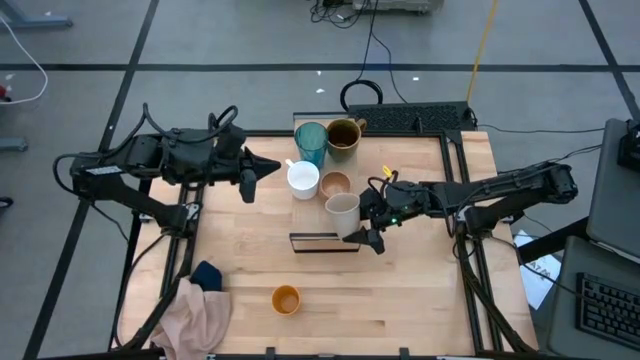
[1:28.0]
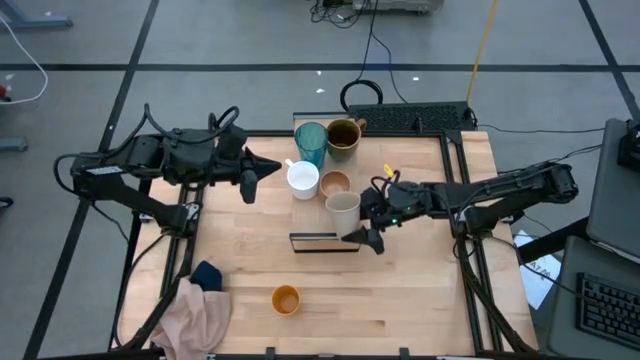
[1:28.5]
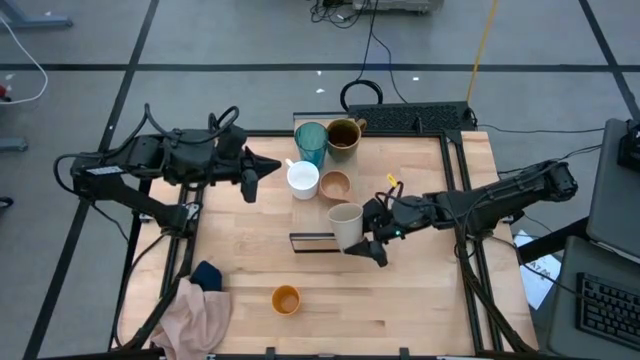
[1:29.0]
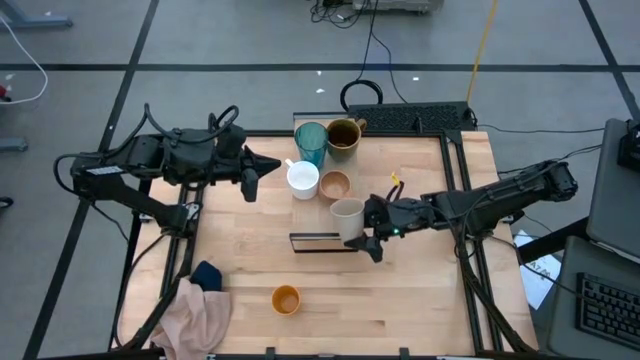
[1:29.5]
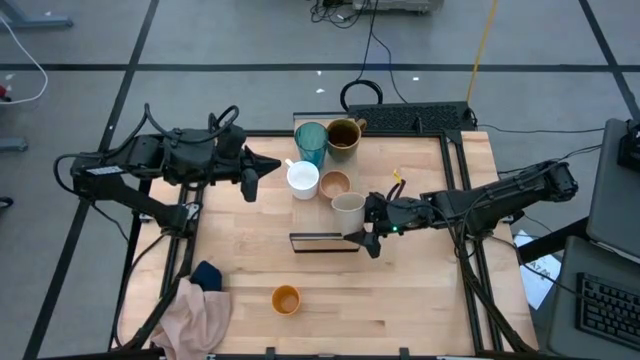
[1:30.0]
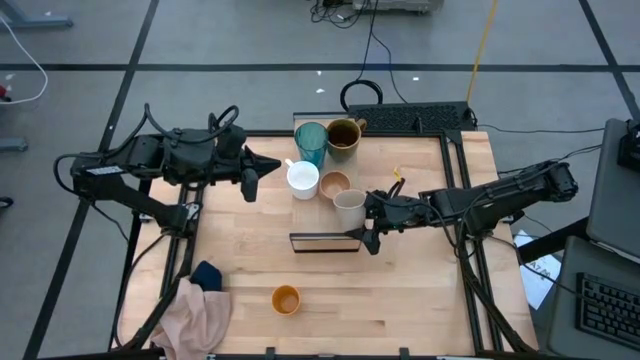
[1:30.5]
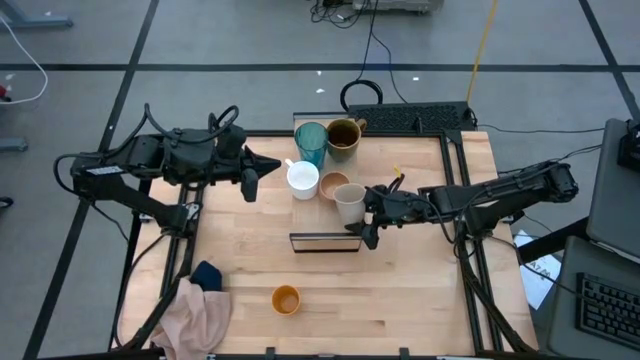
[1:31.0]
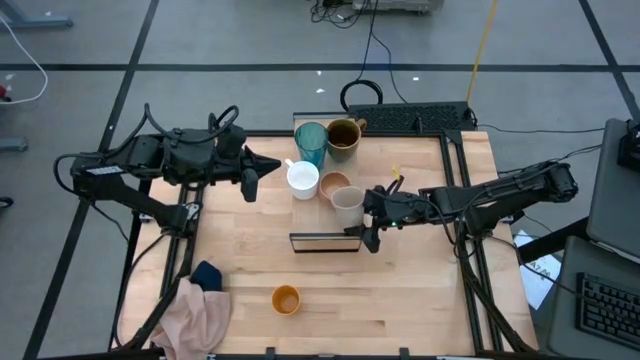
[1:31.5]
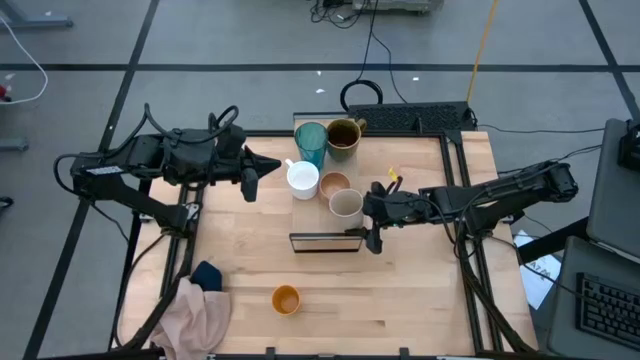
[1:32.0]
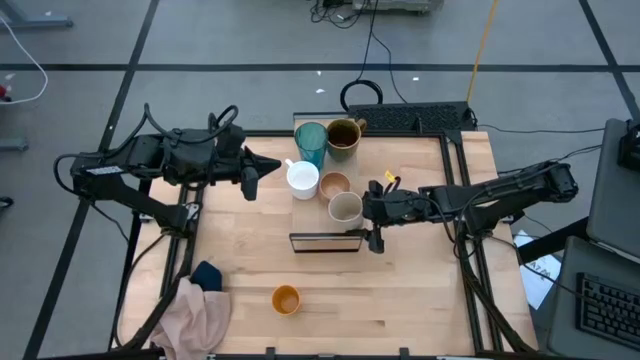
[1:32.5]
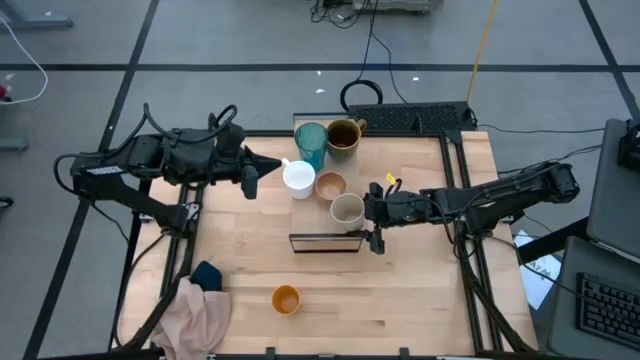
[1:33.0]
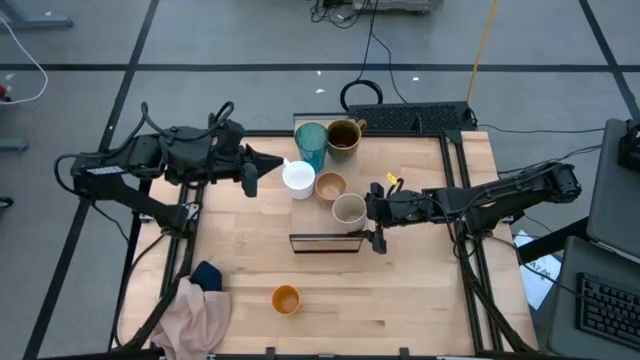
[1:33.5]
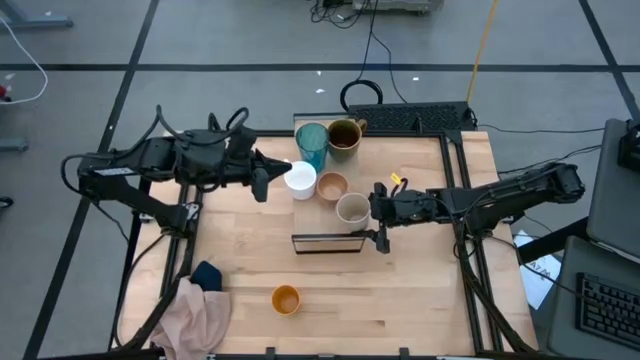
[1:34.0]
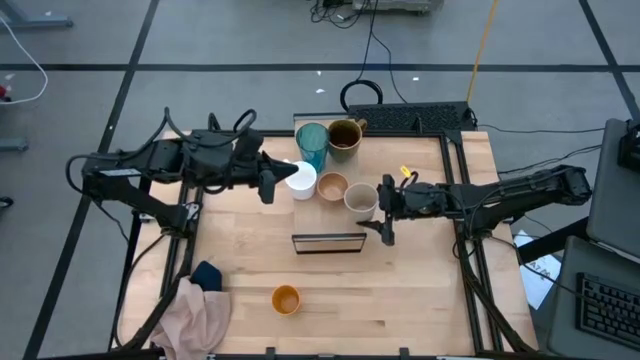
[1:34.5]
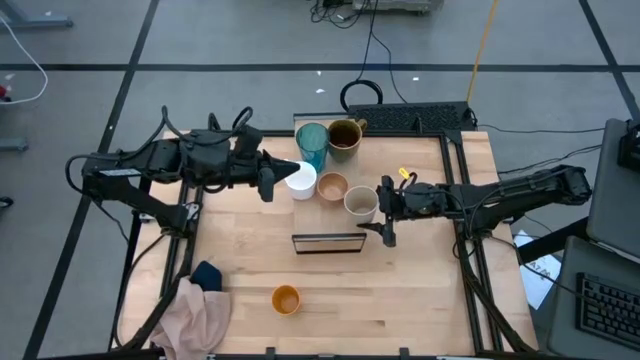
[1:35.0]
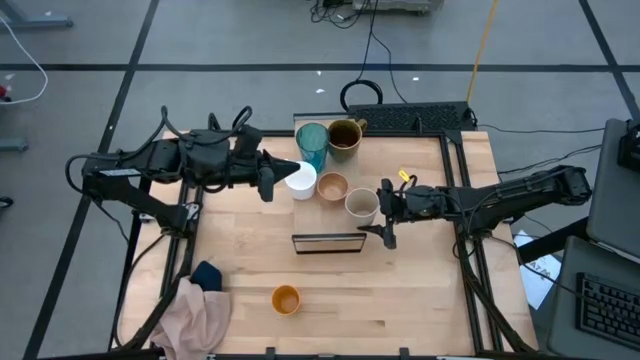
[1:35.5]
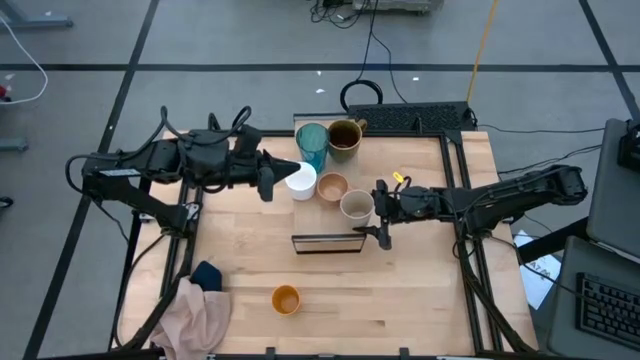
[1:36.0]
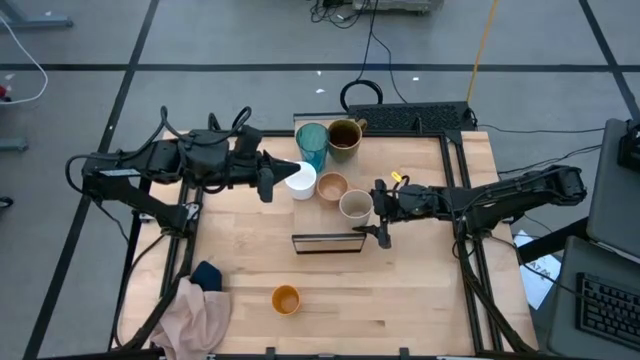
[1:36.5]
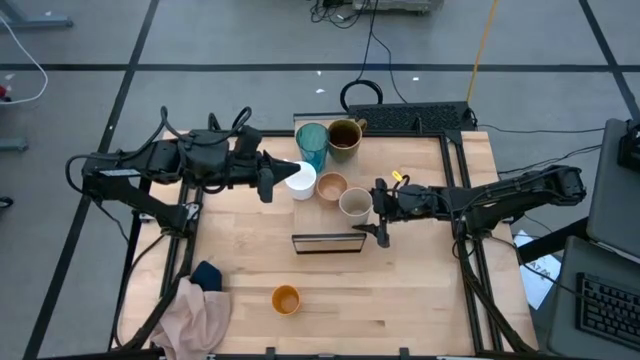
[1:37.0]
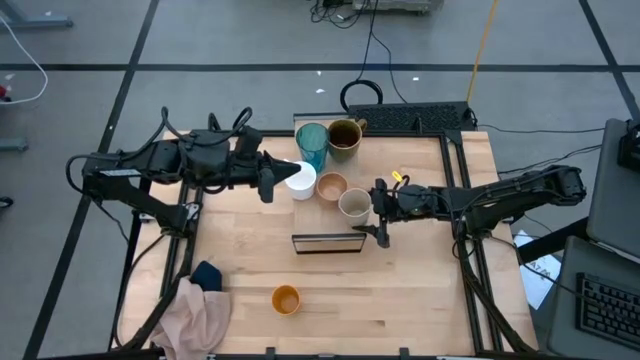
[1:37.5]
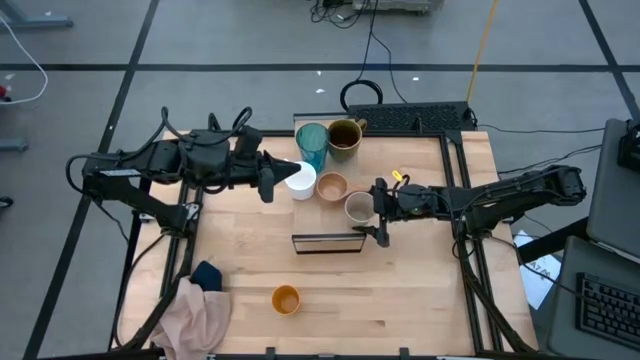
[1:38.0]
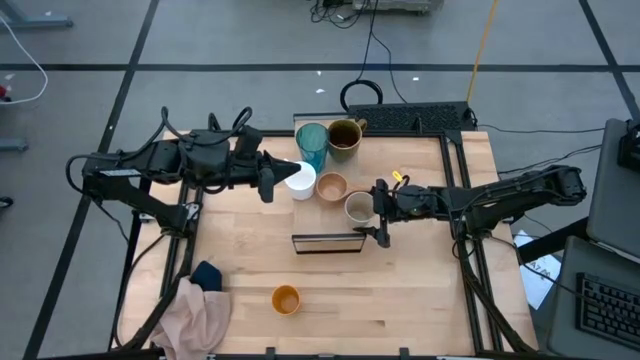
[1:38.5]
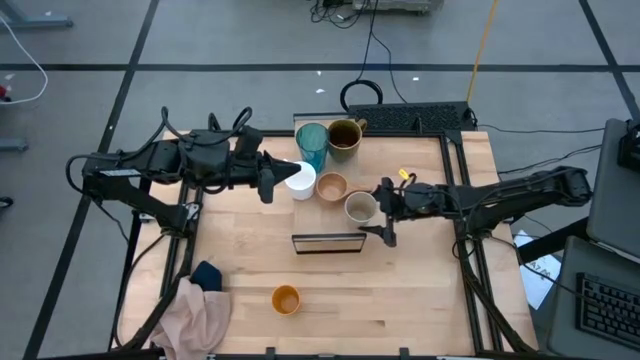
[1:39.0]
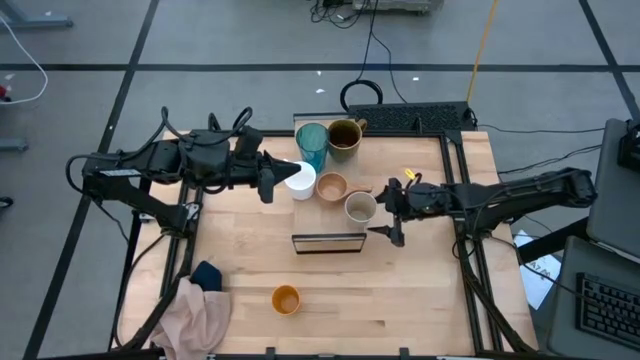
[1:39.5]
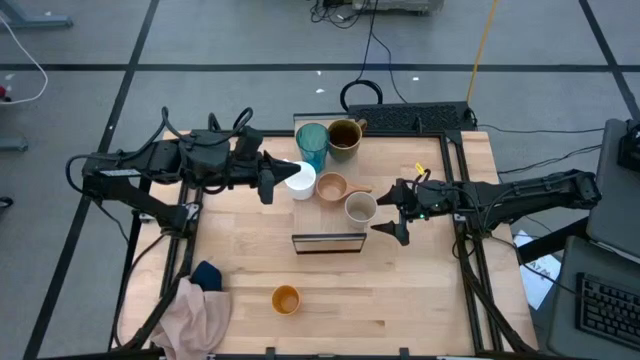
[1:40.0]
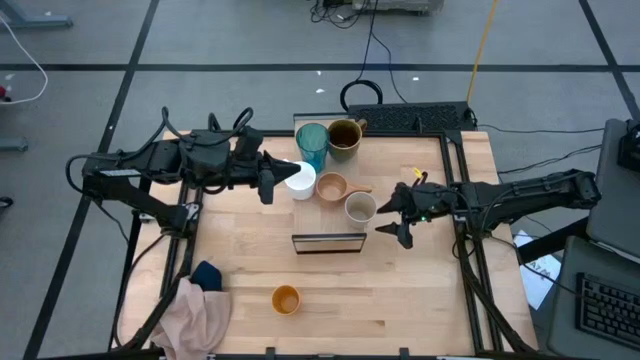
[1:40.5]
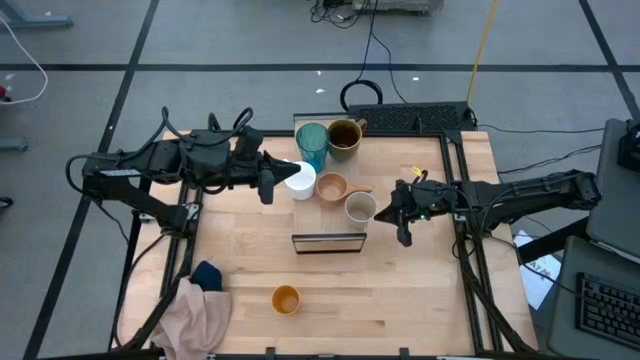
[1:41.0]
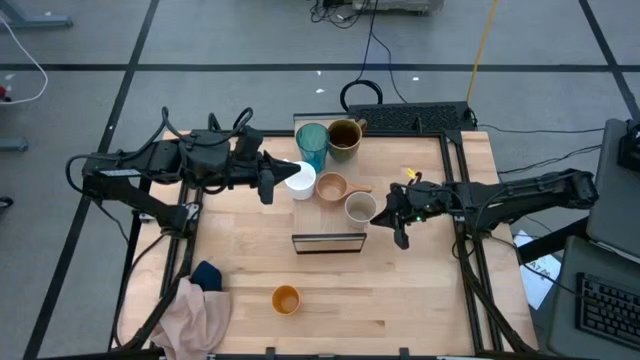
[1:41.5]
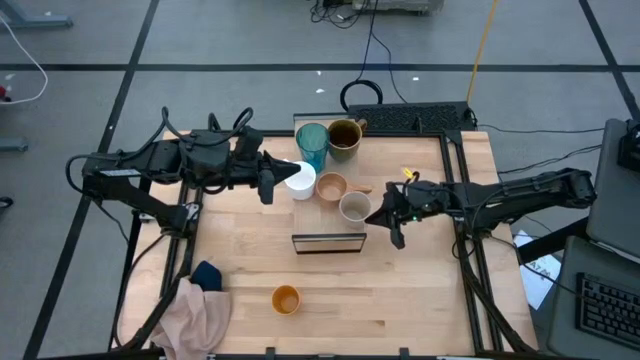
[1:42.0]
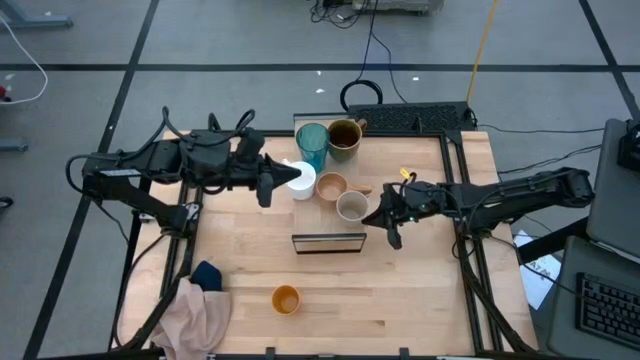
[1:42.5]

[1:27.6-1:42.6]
Task: Stack small to large cups/mugs on shelf
Put the white cup on the shelf

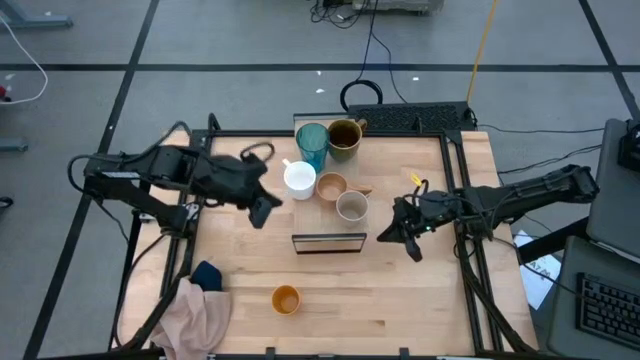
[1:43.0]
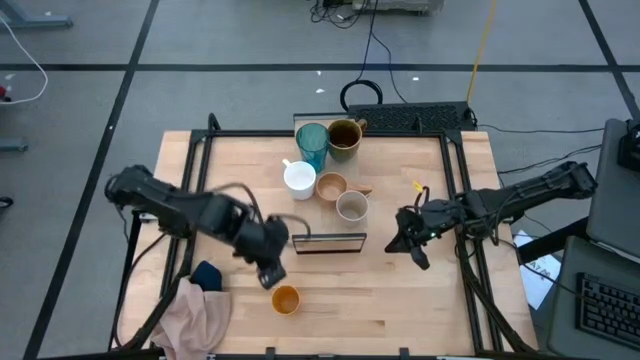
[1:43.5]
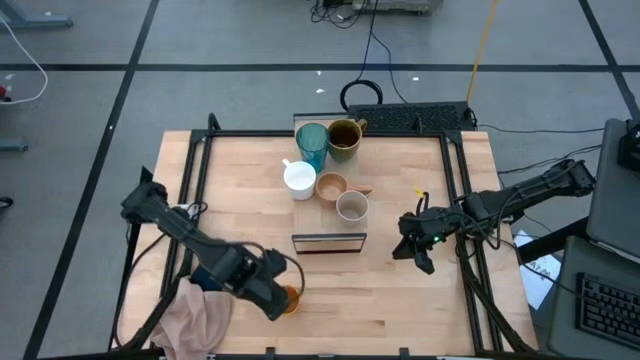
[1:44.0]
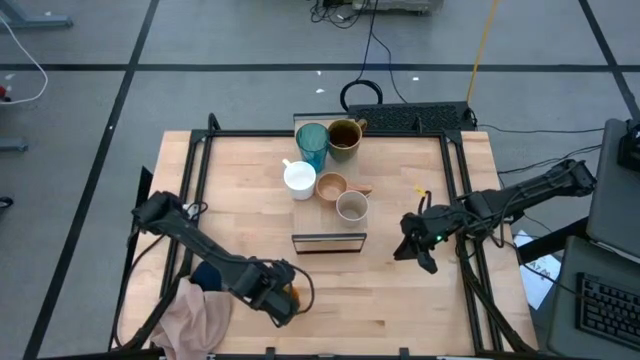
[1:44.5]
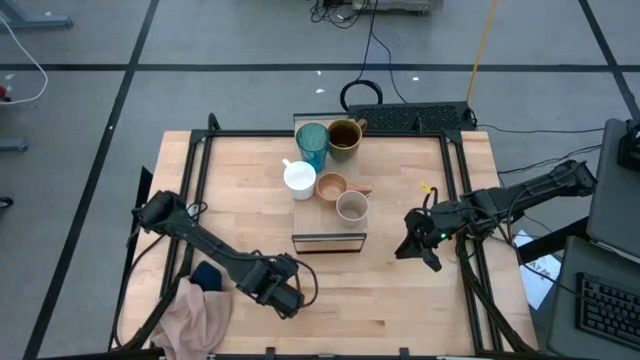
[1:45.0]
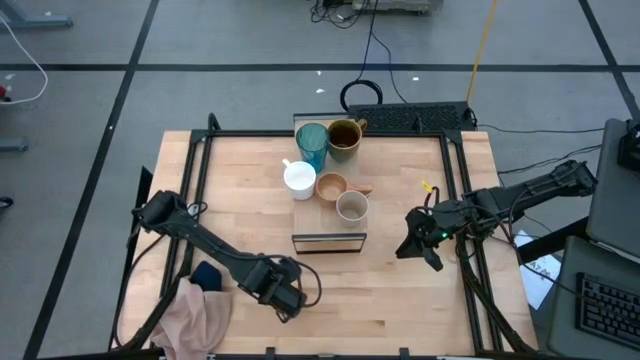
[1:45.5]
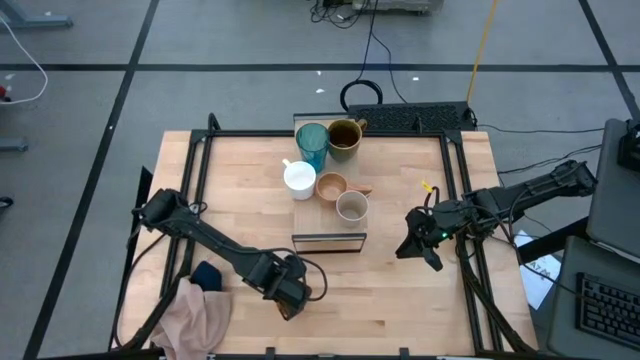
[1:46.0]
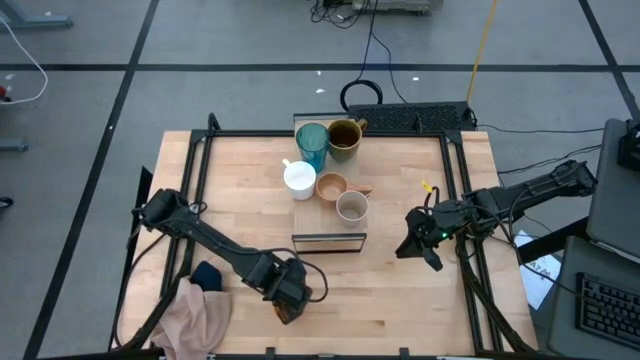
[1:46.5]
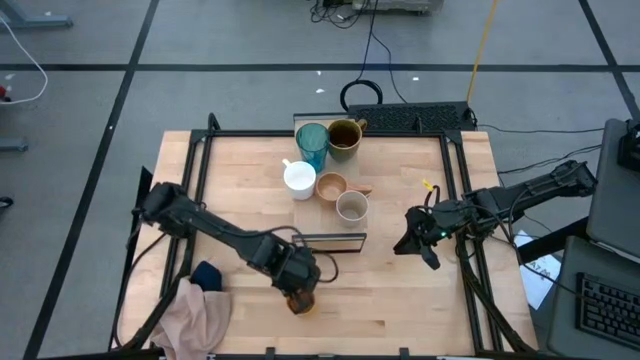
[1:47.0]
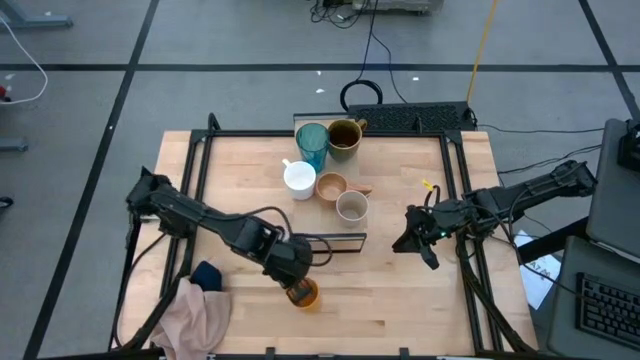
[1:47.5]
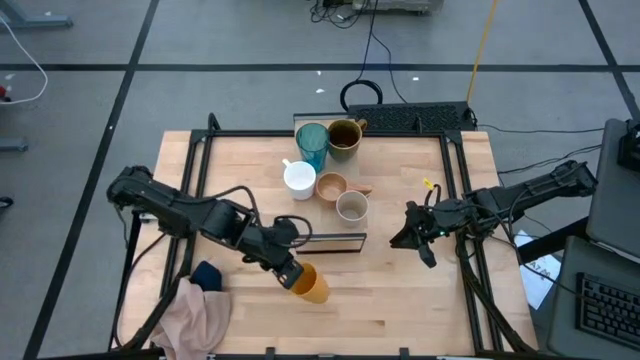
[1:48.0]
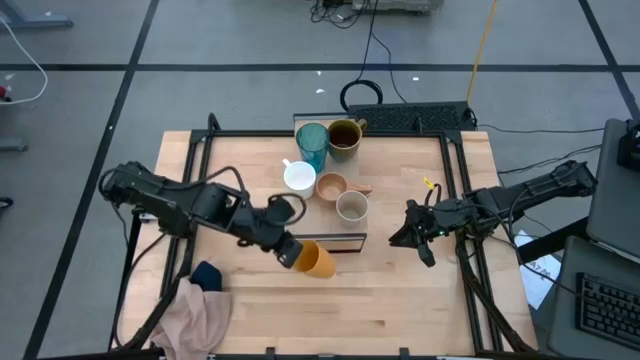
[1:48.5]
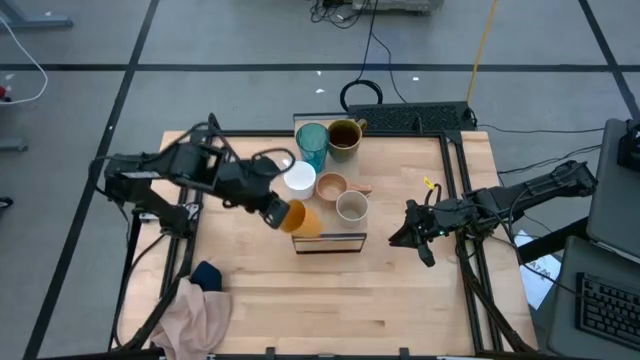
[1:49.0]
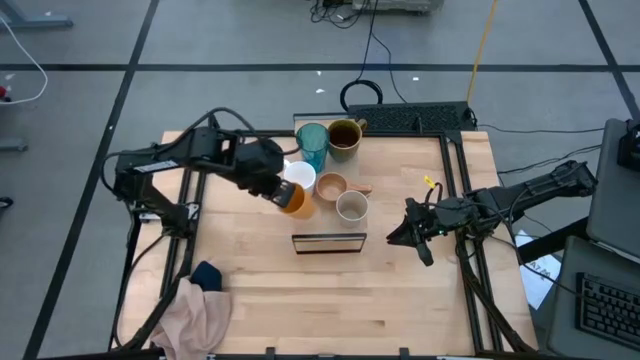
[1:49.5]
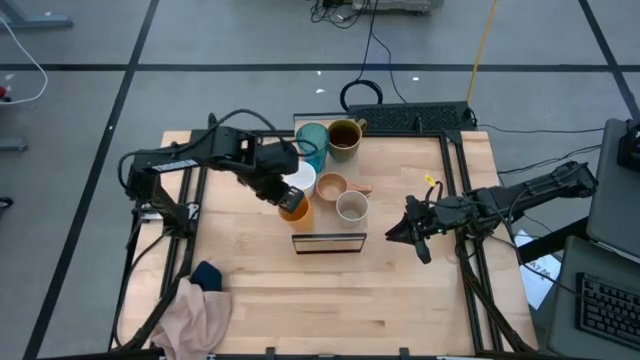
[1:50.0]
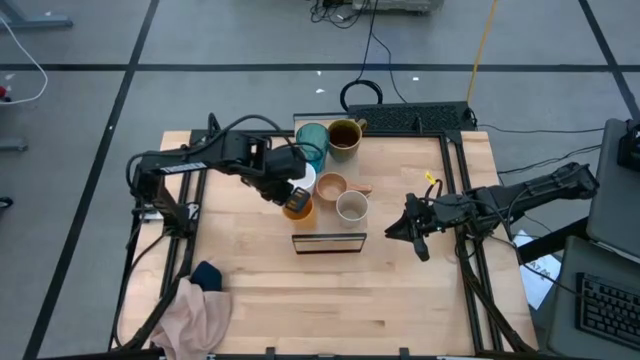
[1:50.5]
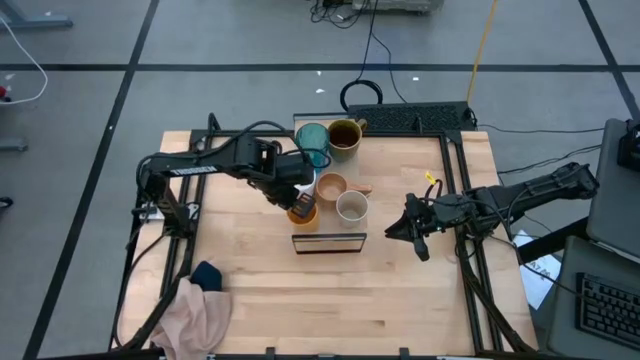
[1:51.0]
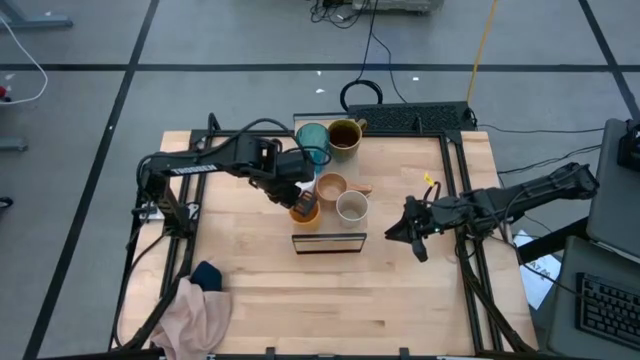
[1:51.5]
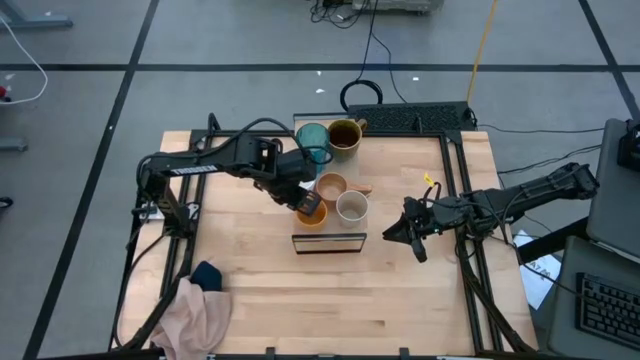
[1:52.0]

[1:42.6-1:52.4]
Put the orange cup on the shelf
